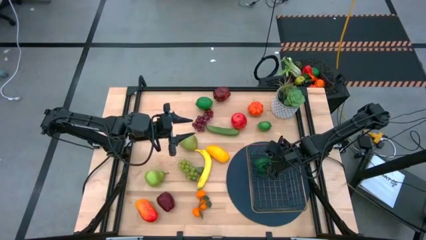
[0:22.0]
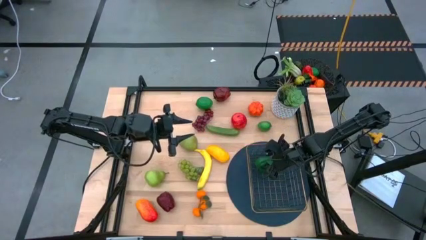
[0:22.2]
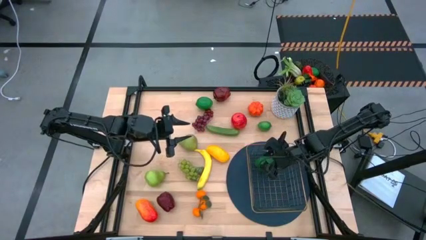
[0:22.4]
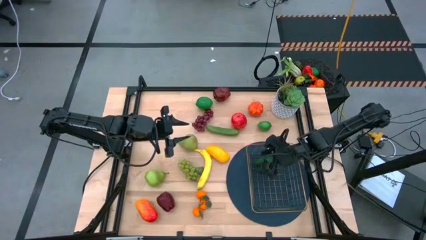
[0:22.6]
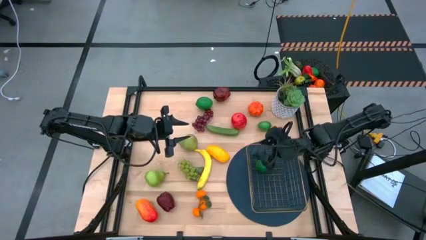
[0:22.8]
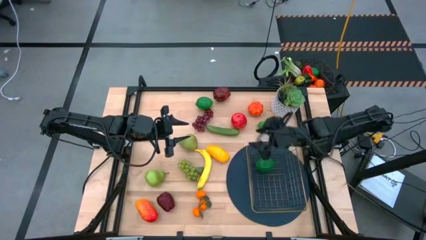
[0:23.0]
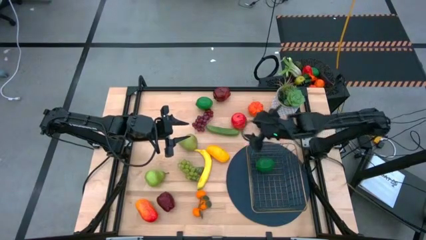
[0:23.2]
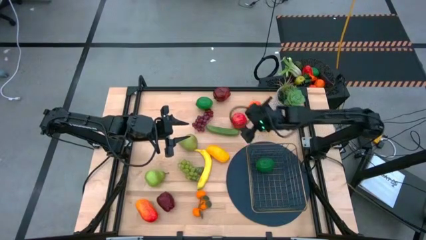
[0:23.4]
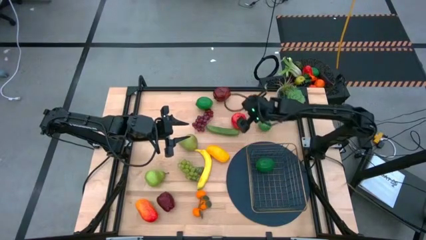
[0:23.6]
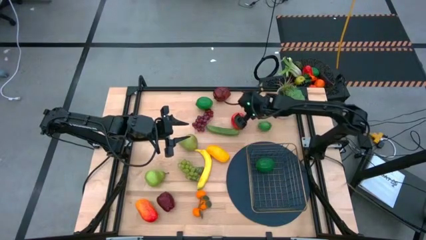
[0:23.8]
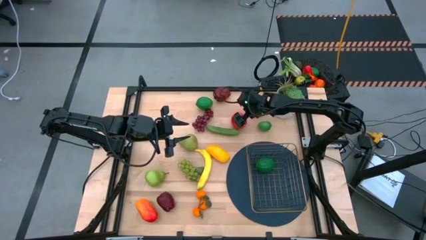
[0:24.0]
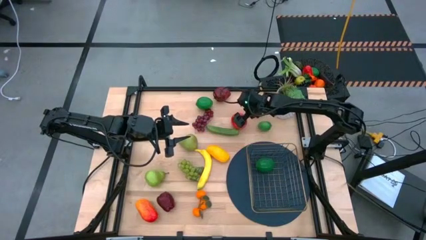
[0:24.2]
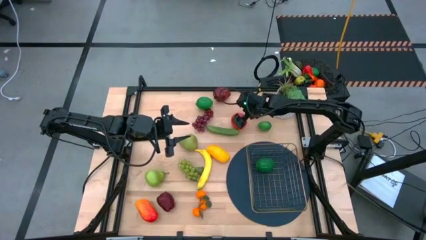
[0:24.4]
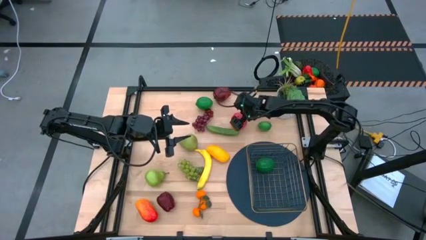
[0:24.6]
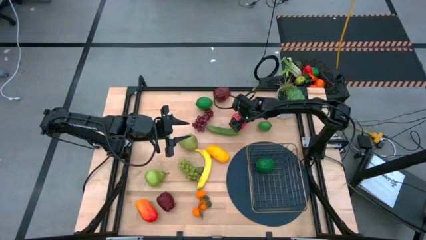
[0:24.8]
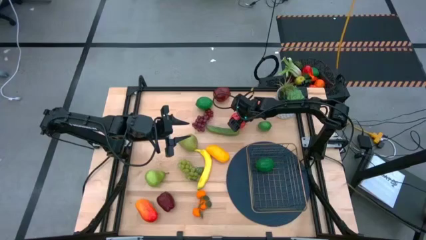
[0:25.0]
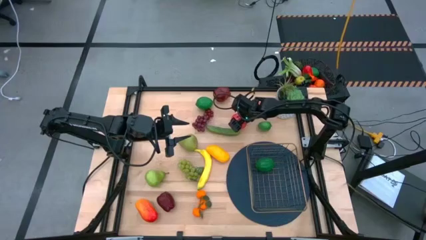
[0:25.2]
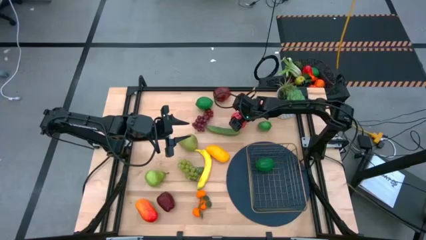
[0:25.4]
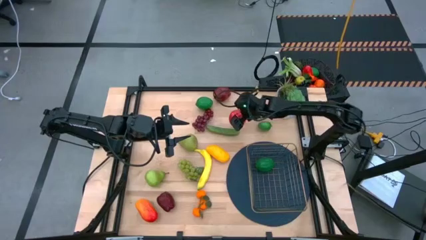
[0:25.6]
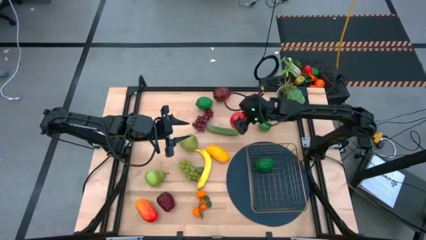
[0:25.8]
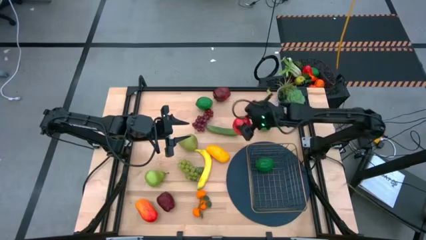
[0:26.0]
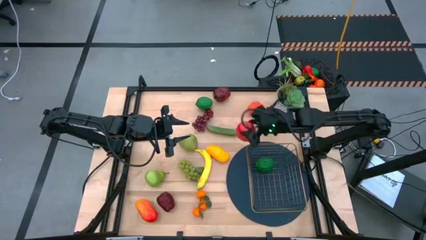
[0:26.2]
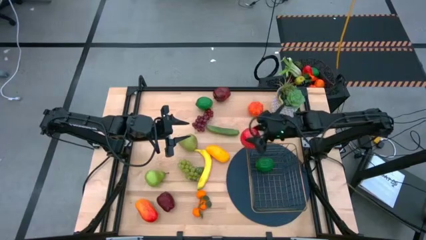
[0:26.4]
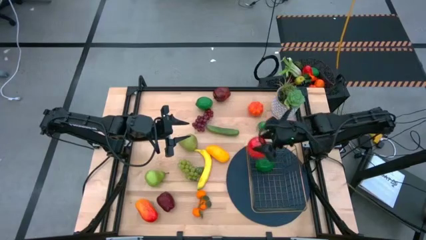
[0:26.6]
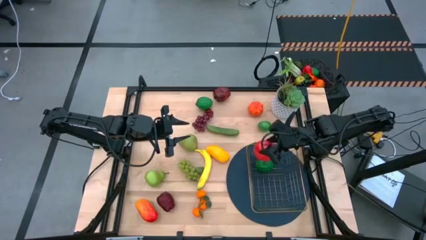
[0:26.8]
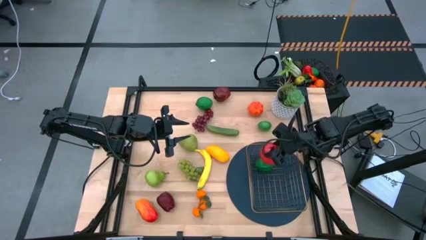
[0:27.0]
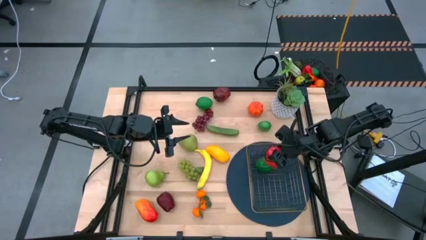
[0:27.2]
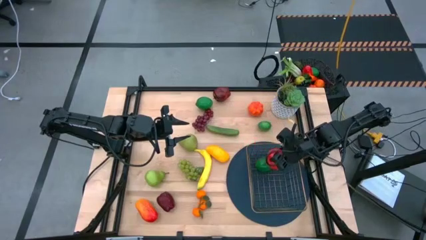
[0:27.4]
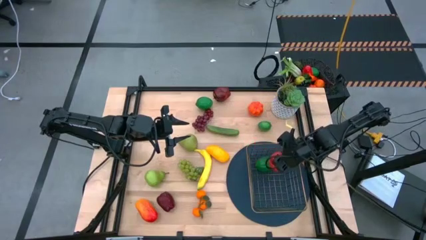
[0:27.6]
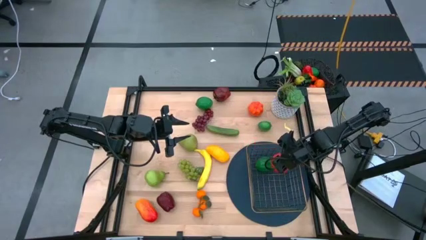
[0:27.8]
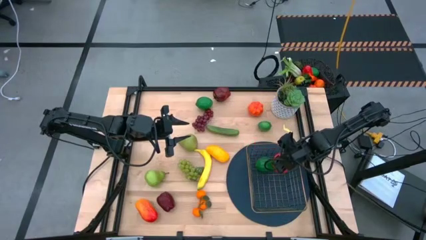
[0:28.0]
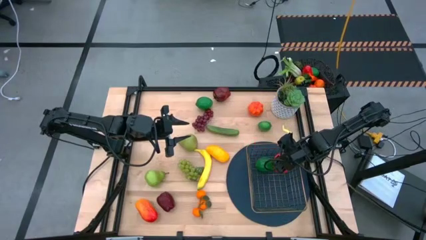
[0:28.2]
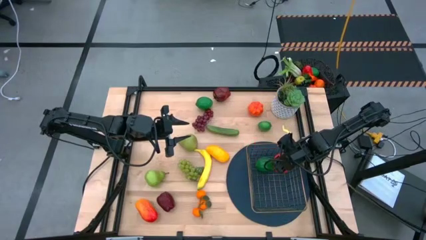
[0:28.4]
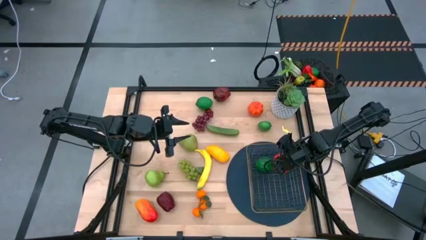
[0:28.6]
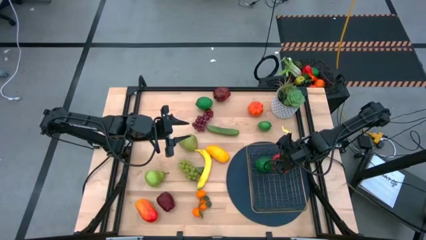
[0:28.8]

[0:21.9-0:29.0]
Task: Build produce basket
Put the red apple into the wire basket

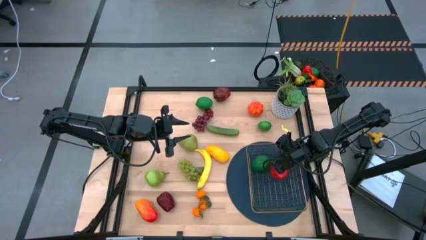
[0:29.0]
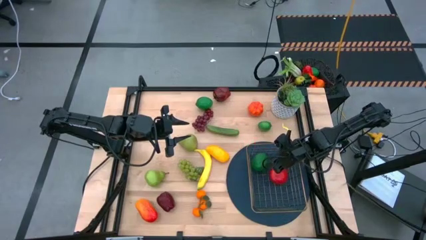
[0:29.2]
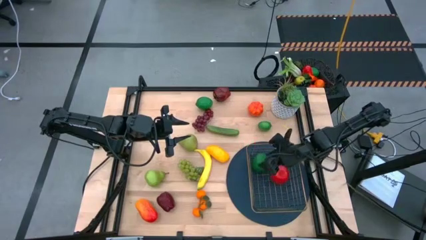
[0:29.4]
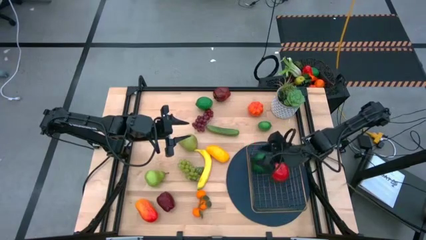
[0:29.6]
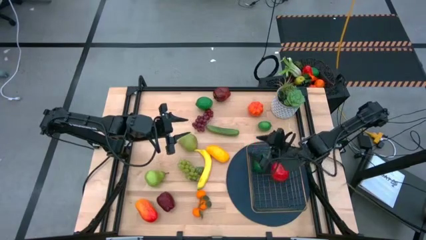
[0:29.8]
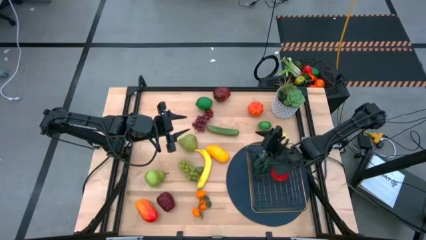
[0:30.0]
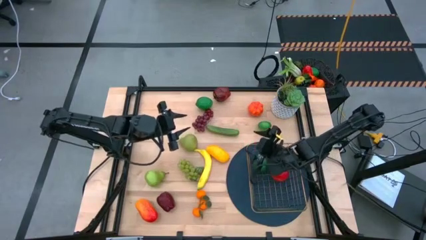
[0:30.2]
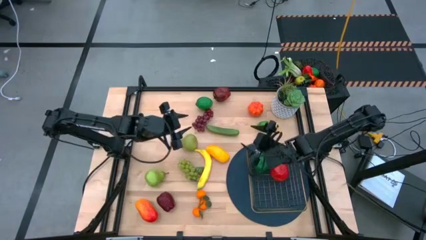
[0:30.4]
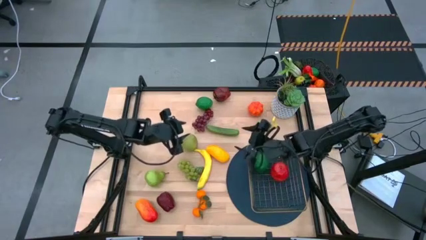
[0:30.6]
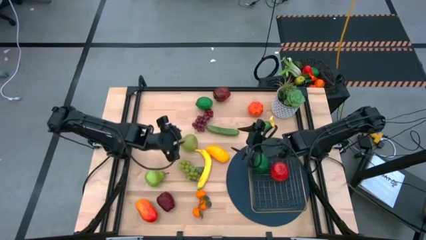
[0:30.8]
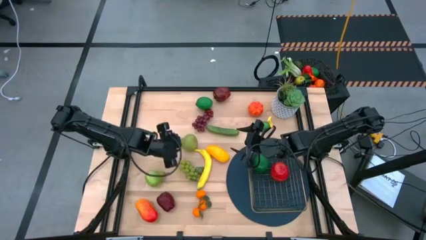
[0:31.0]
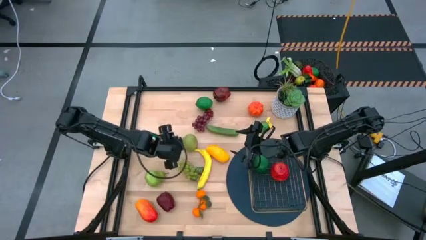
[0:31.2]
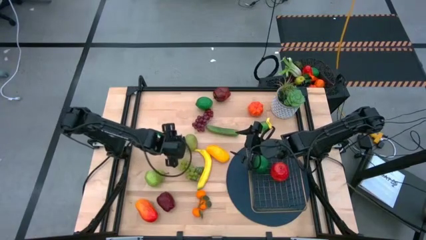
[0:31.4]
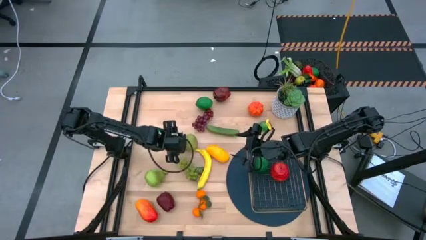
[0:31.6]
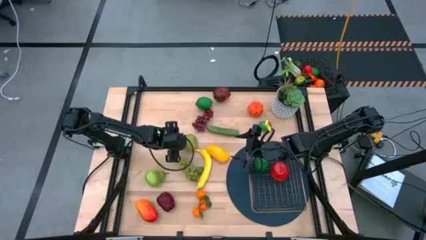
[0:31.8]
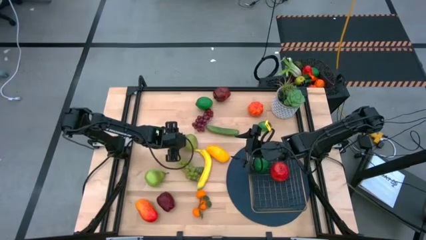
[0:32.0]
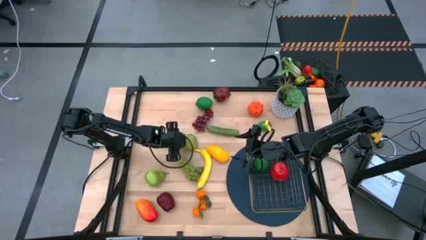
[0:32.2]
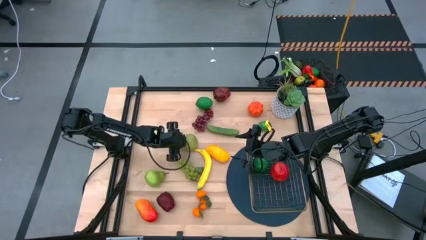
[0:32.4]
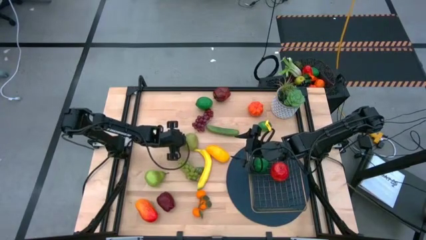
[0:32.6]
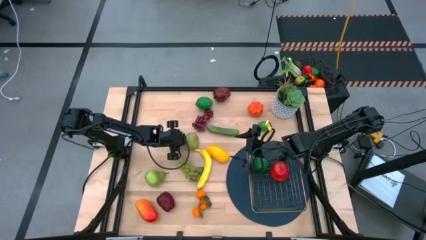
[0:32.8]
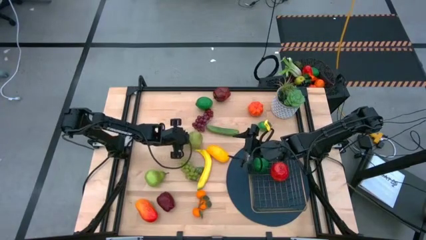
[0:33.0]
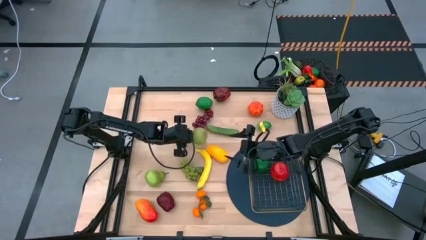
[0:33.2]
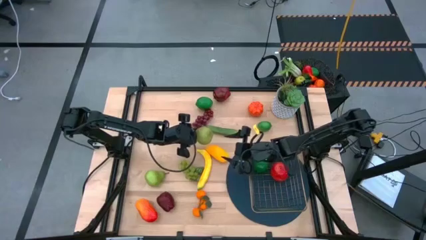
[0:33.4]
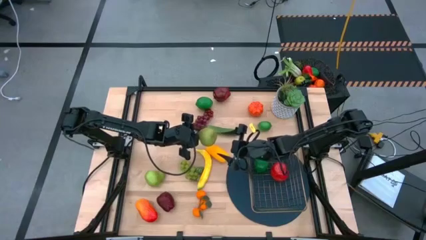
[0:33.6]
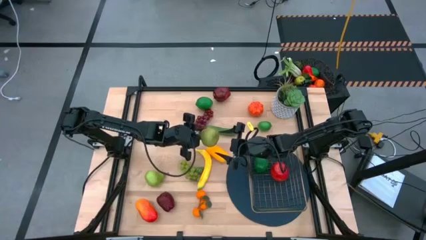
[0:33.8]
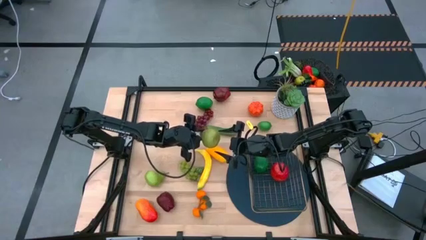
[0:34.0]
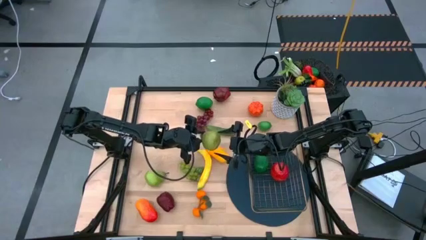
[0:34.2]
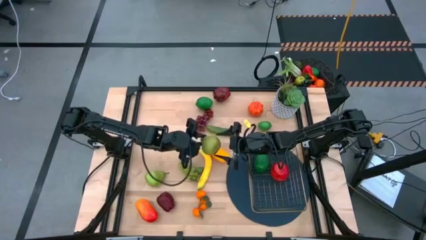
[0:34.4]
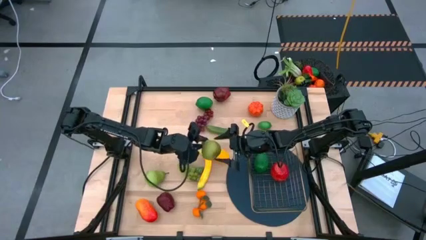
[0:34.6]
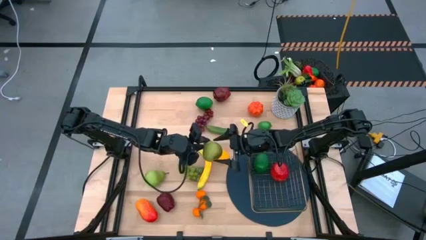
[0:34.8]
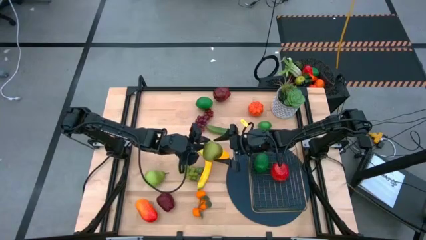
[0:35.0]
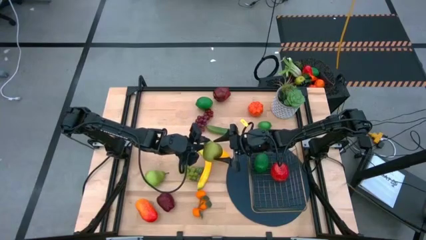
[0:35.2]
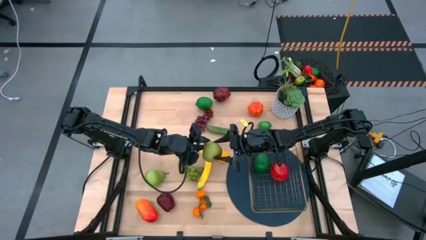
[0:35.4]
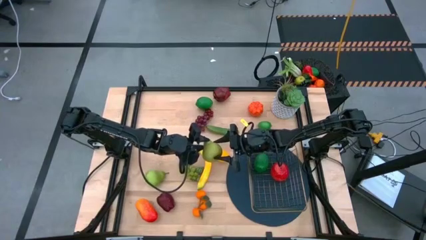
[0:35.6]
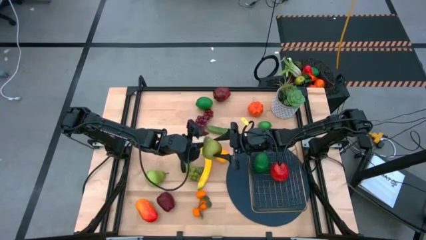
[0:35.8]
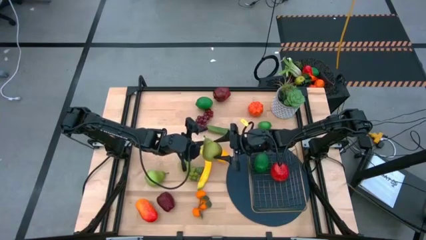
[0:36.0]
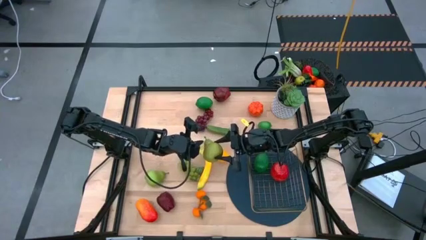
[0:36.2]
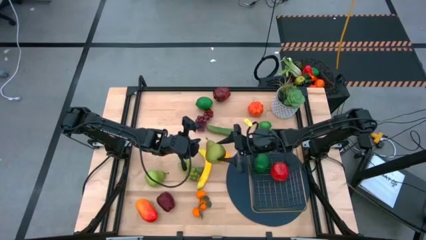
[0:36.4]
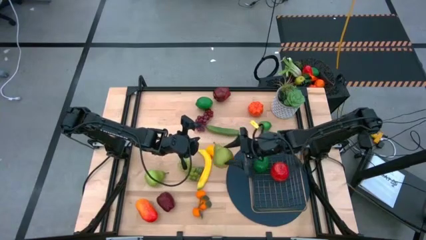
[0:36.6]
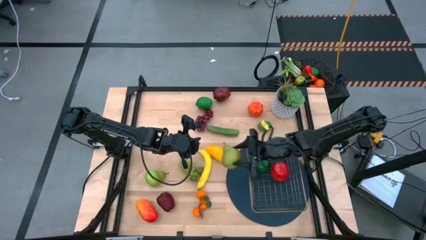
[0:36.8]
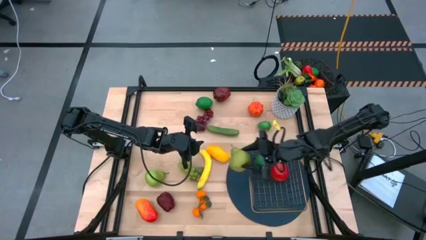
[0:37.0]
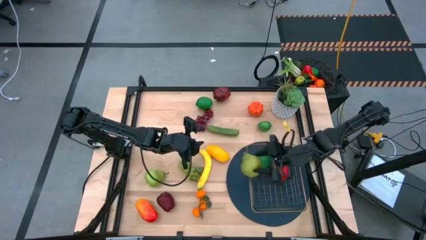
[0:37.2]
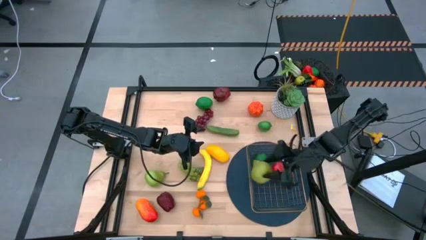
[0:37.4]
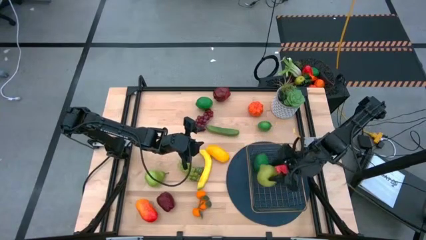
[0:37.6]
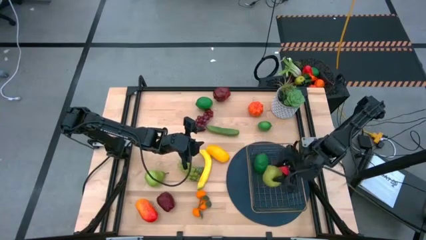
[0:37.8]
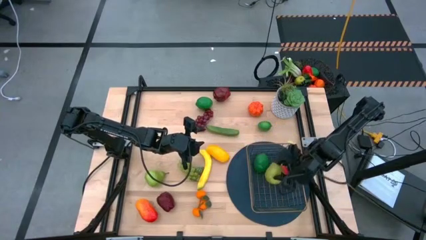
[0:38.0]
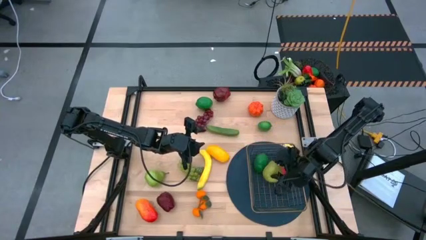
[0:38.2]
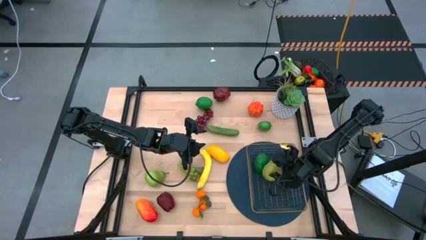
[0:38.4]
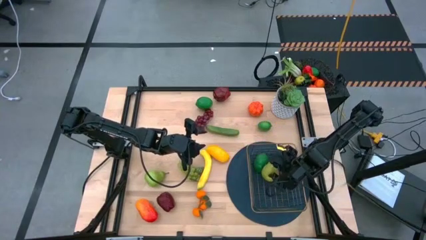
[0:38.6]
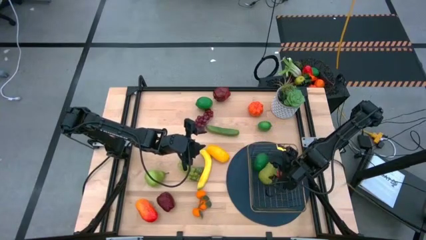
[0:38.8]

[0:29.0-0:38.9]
Put the top pear into the wire basket
